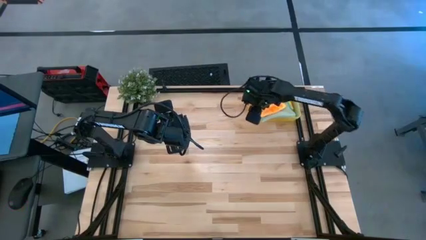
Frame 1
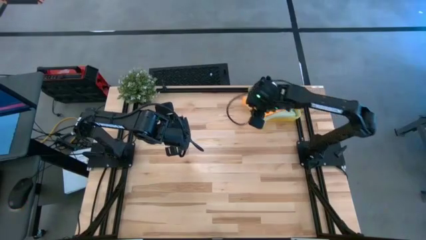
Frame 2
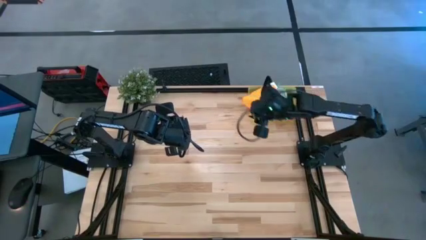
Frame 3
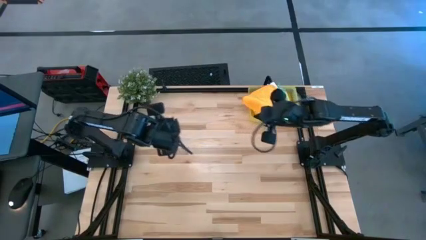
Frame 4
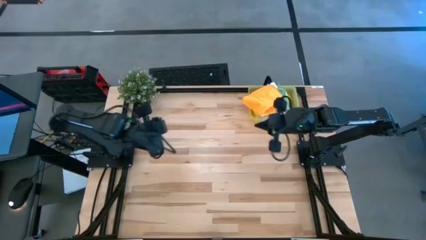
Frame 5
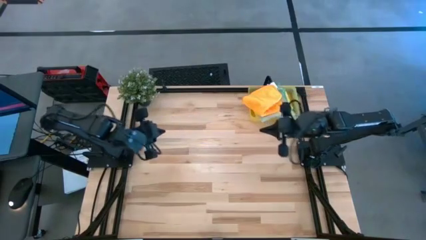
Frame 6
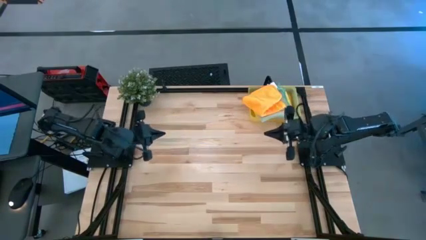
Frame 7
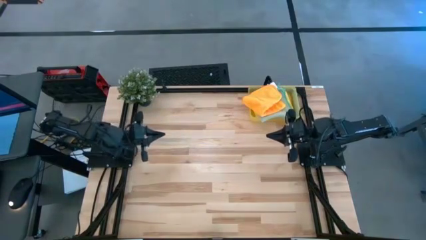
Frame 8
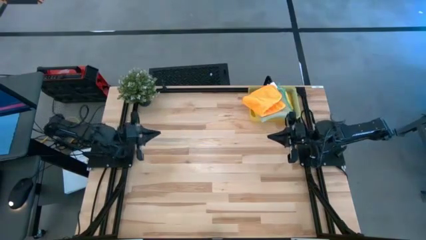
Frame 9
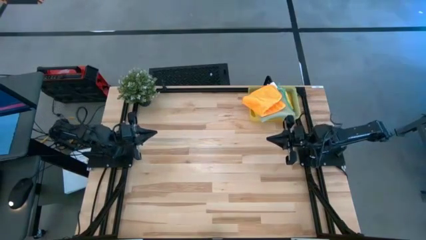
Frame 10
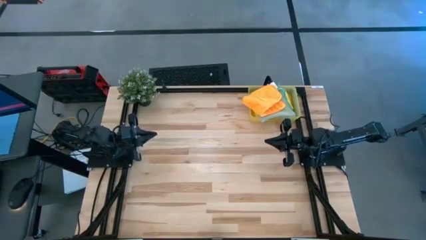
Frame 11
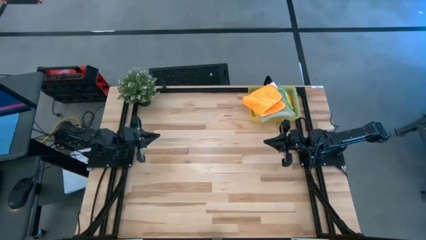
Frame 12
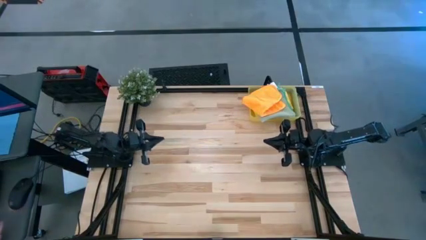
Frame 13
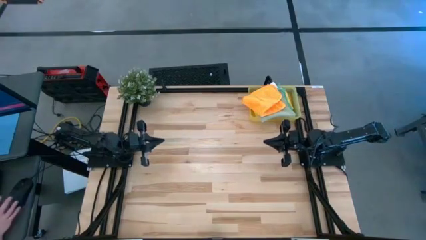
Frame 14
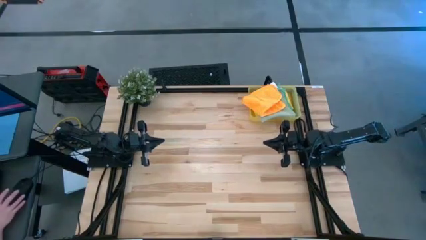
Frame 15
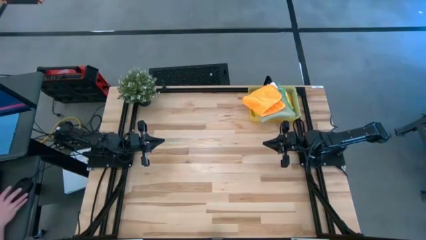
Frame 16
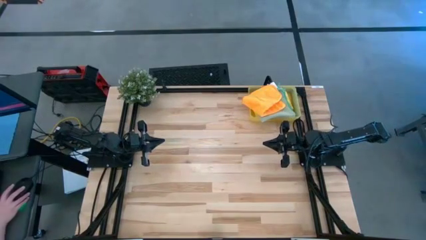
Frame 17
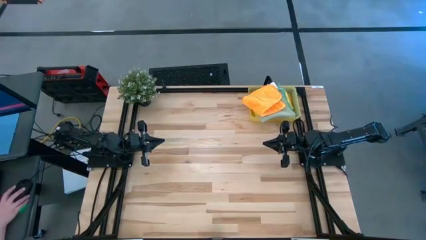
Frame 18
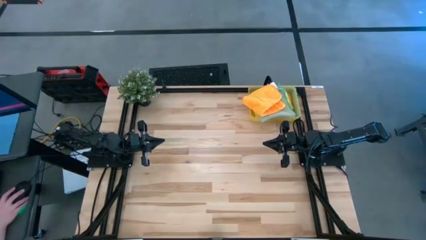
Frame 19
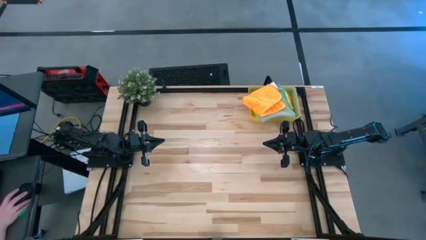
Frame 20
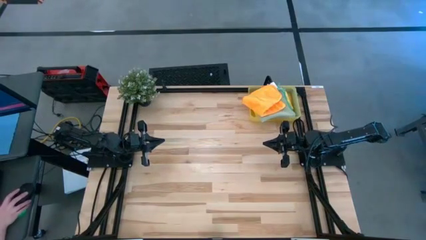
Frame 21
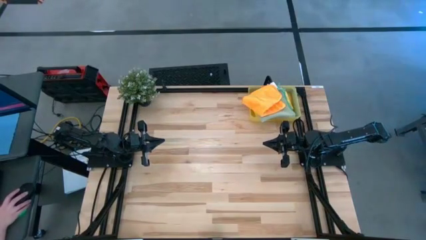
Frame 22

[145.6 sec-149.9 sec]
Task: Fold microfiber towels
Return to Home Position

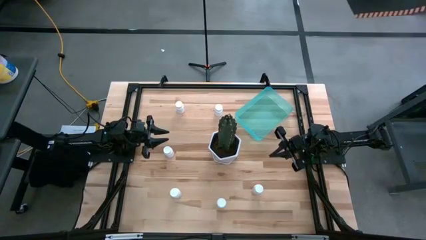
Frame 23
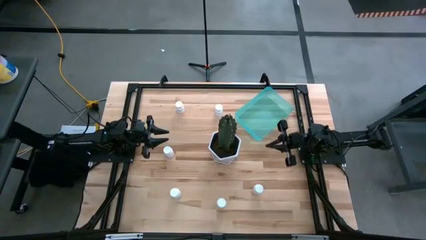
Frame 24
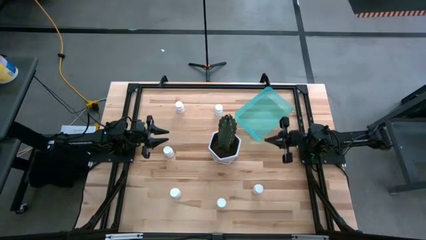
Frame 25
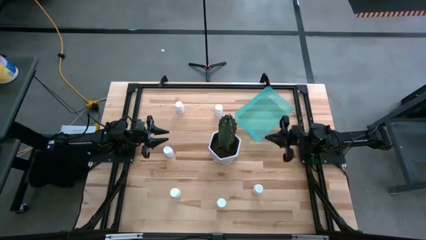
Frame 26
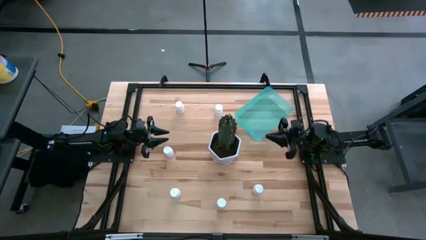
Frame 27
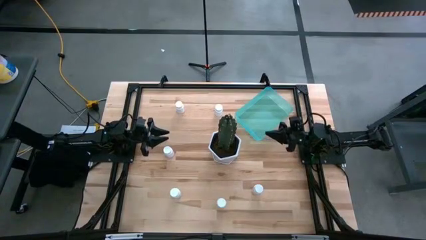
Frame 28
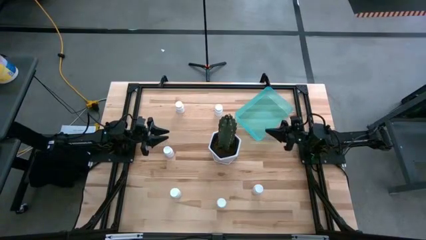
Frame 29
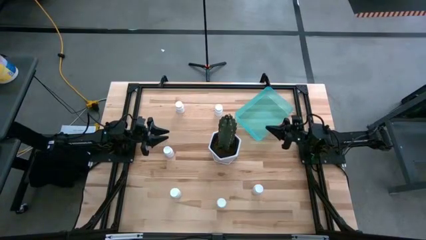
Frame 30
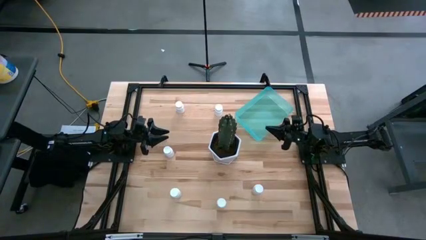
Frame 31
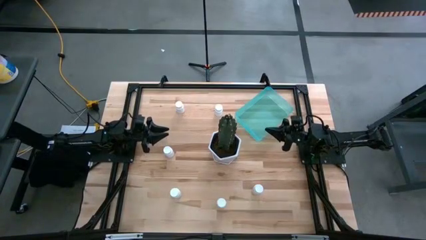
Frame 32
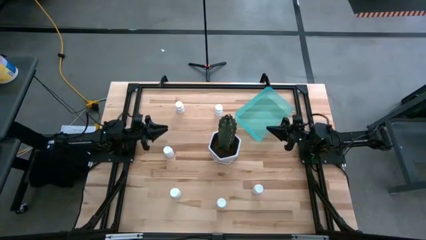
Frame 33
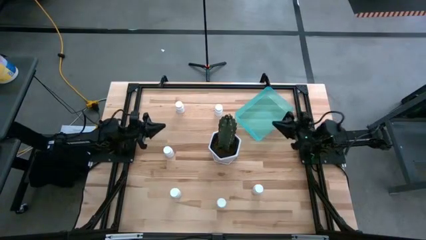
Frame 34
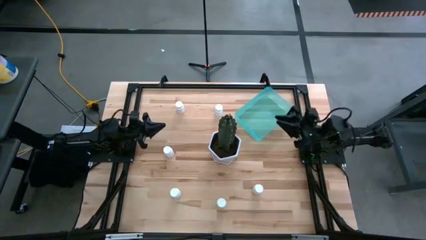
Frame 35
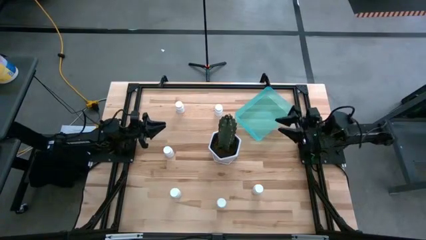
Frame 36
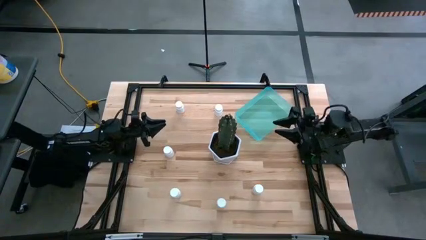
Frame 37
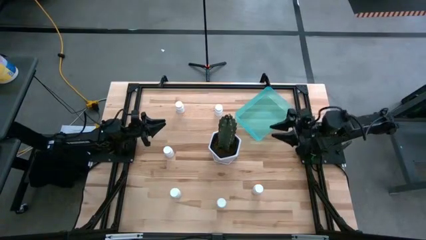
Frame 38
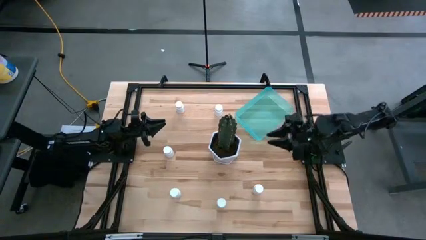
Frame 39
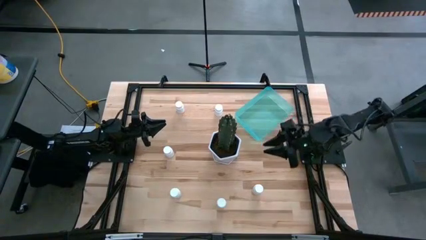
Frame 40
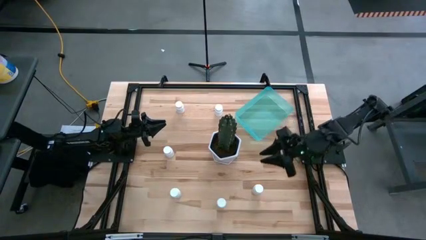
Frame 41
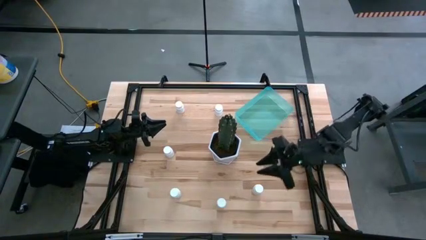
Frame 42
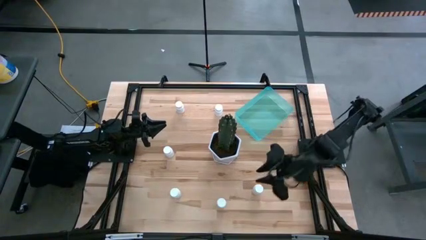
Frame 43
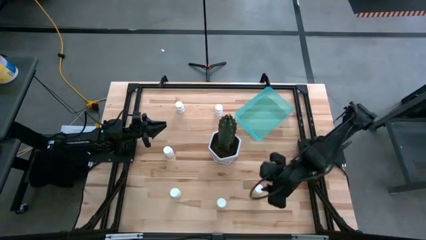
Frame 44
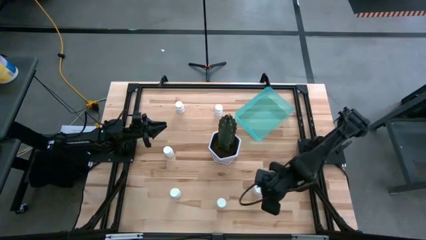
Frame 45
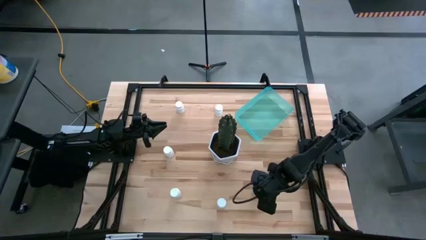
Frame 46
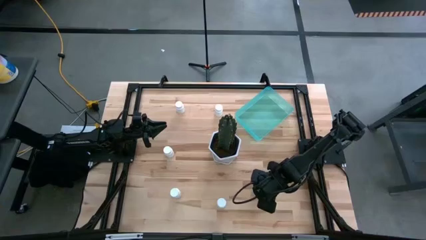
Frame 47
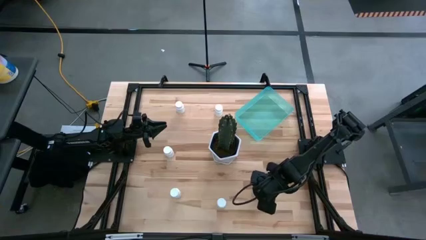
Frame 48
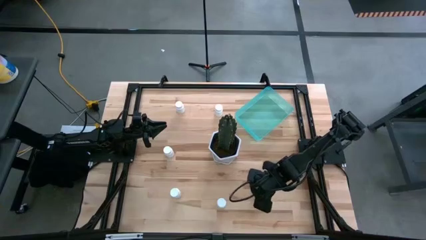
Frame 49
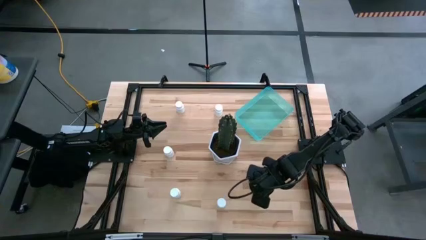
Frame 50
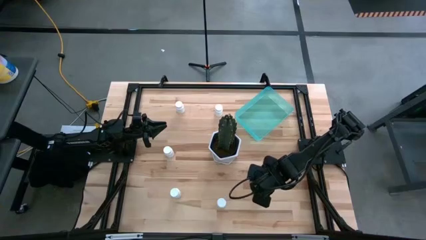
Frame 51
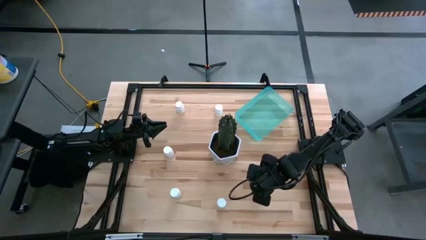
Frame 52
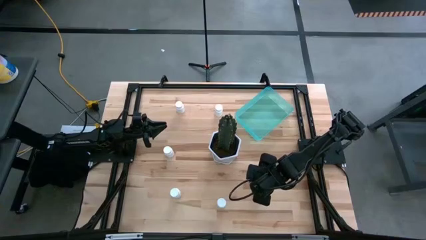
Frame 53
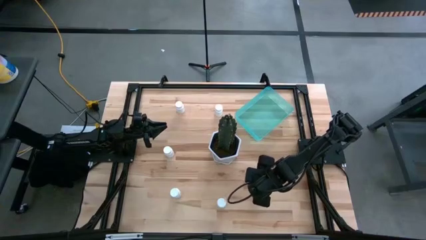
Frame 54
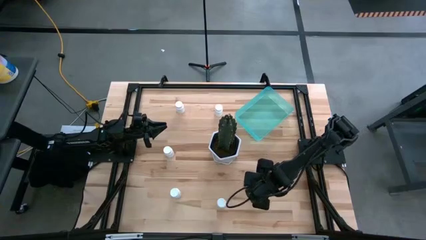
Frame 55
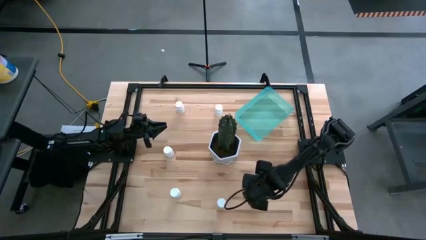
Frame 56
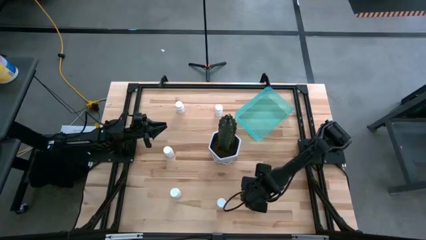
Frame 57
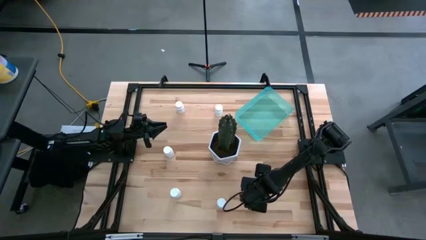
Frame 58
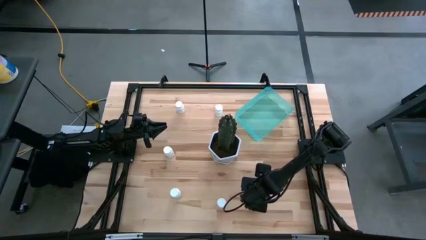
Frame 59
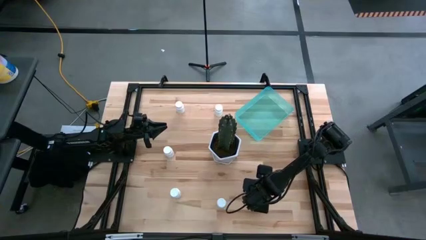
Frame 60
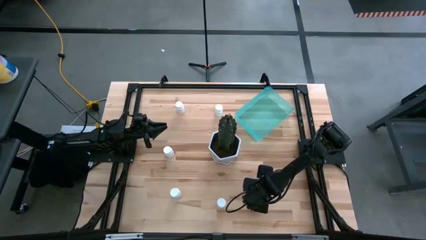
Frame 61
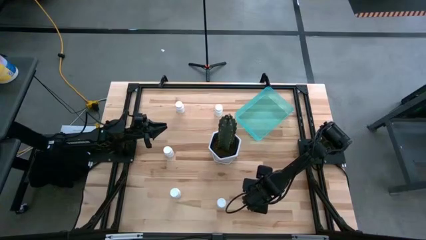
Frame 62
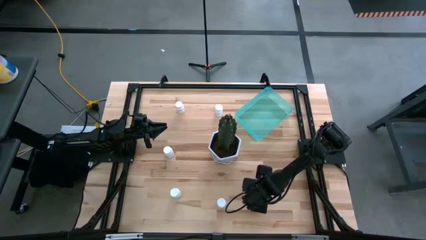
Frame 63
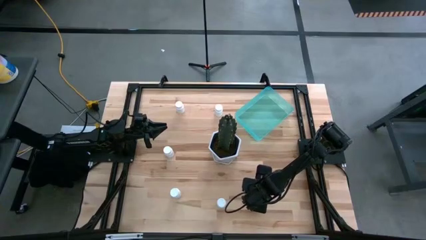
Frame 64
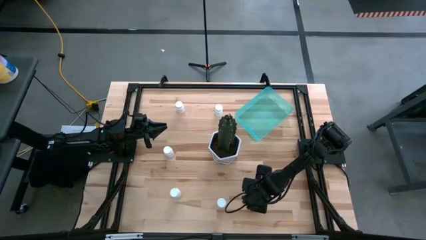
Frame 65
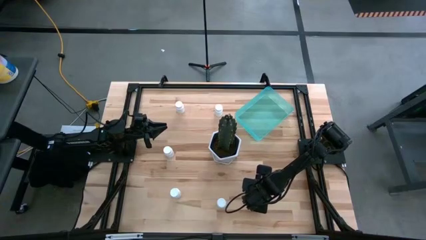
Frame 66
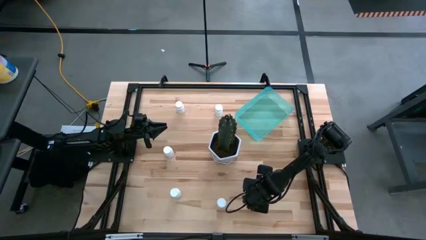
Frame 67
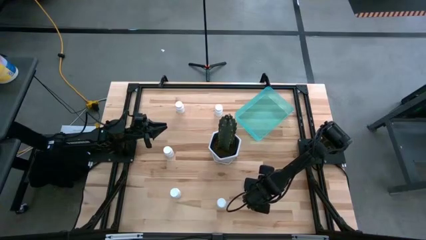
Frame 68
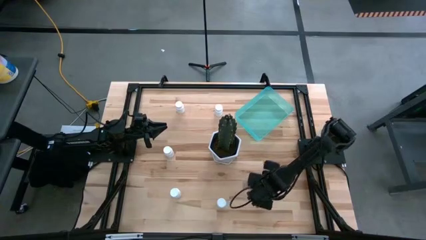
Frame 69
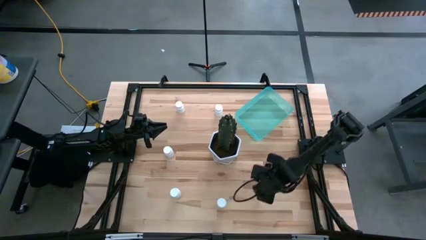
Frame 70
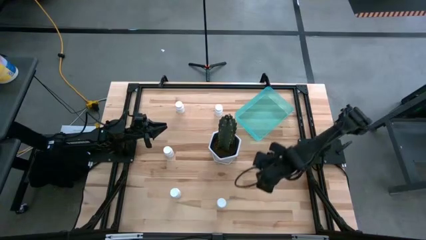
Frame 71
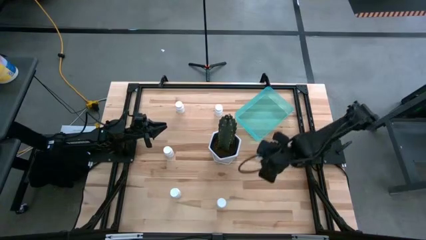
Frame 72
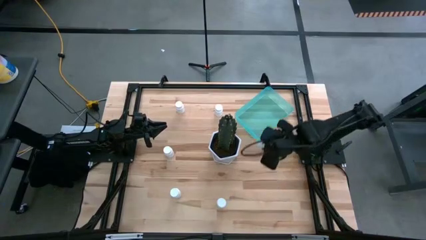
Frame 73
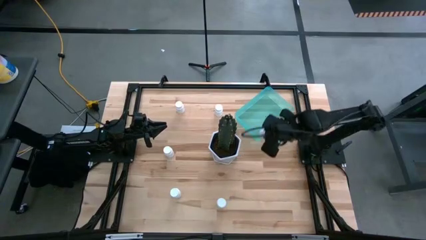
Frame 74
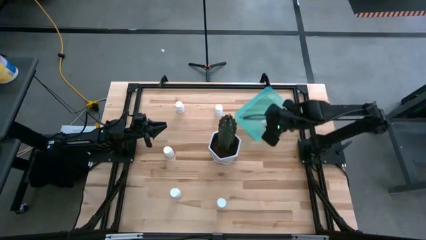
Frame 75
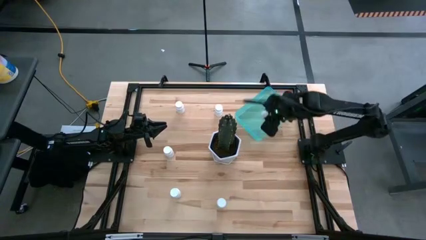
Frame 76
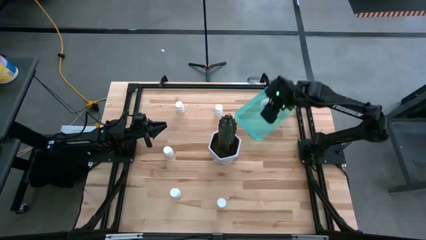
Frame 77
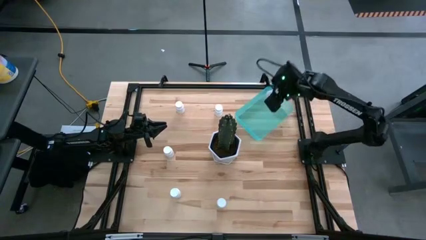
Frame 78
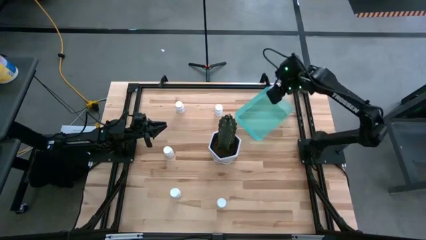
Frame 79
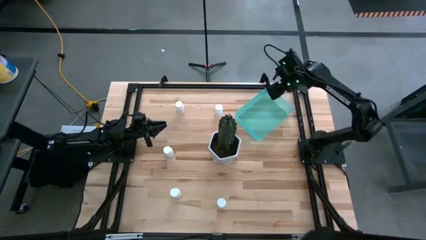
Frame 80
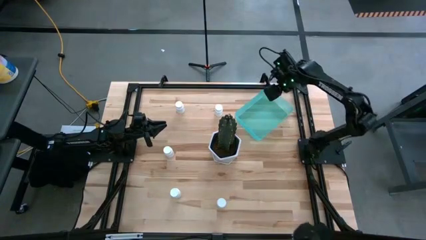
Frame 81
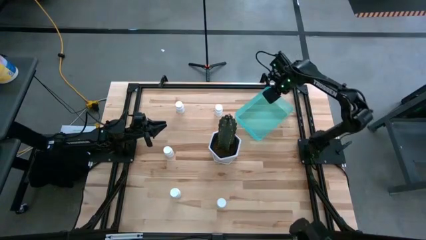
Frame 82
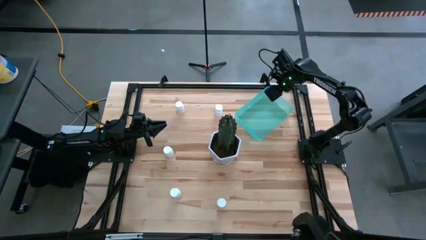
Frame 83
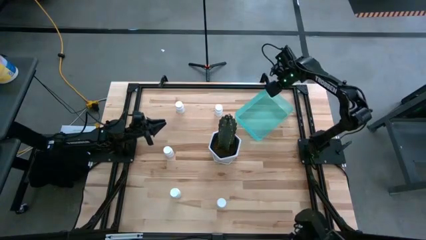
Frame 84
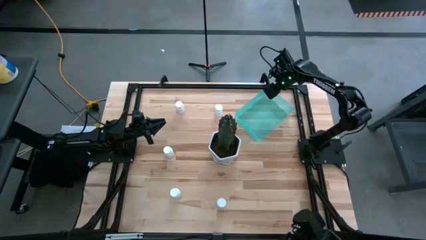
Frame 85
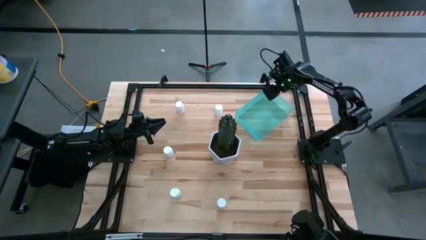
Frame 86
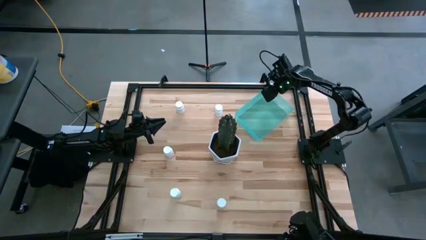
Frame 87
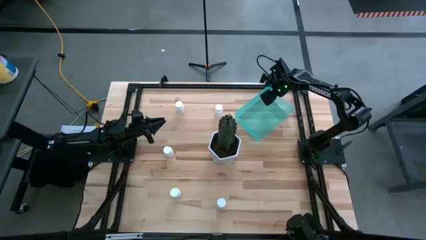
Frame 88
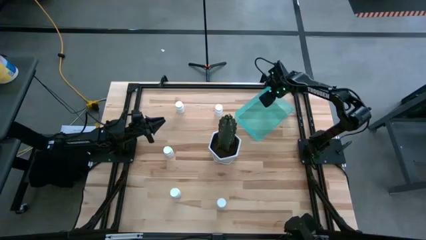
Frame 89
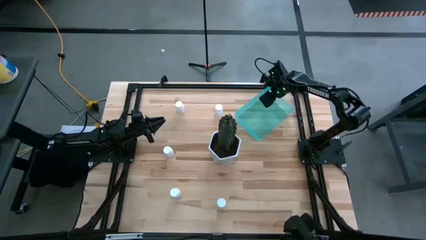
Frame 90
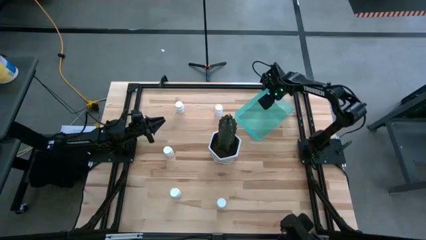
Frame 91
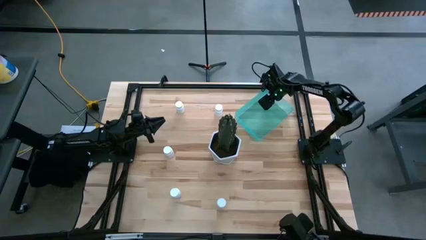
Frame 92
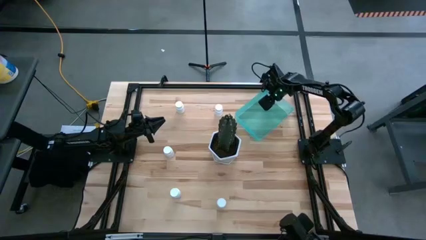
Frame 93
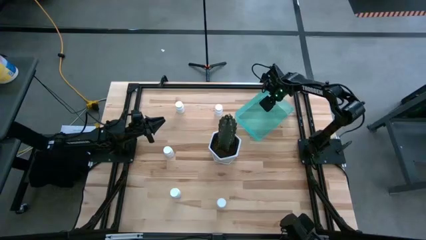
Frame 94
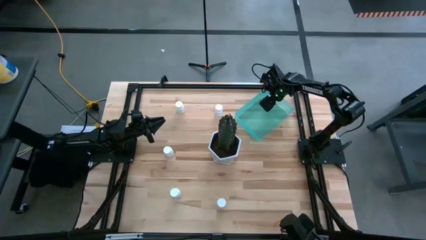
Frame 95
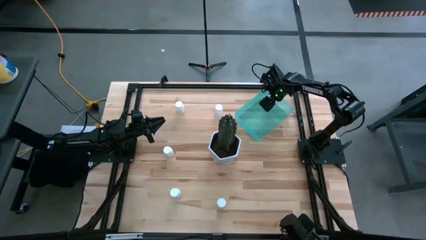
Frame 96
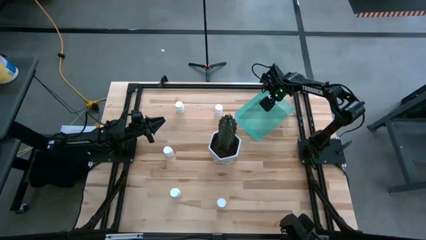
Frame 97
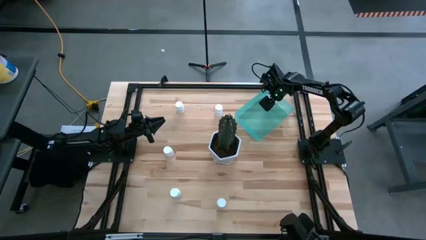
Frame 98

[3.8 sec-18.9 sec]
Task: Pick and place pill bottles into a basket
Put the white medicine bottle into the blue bin
